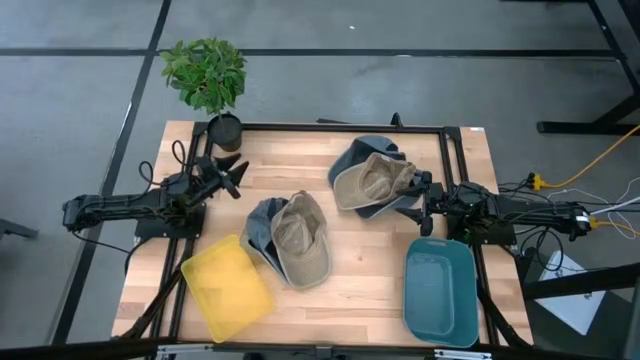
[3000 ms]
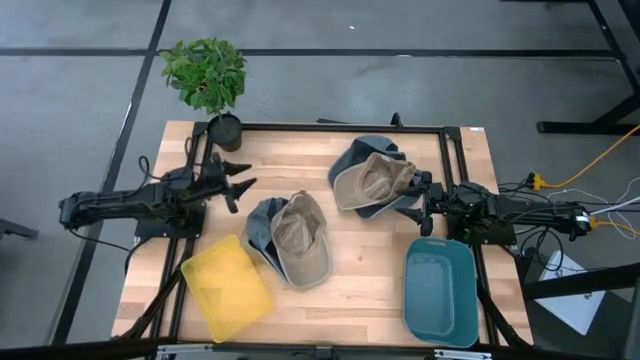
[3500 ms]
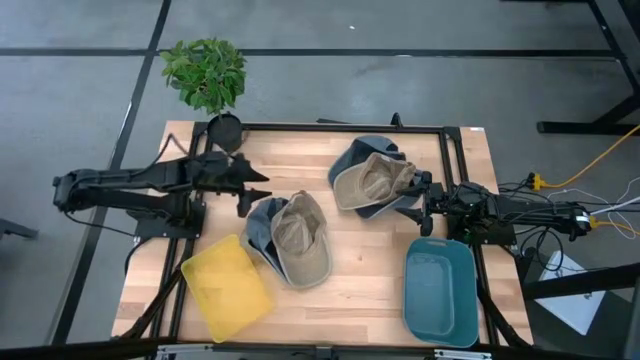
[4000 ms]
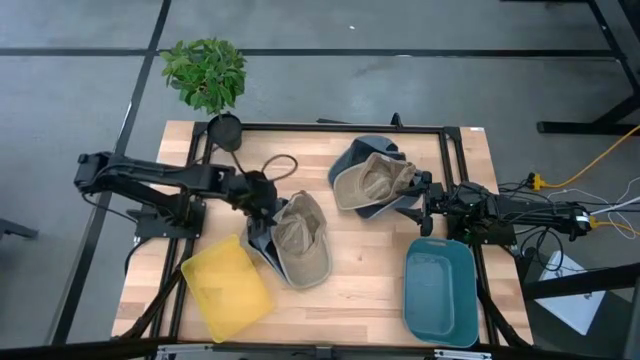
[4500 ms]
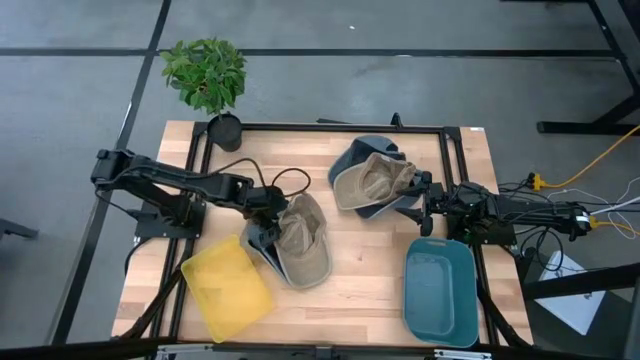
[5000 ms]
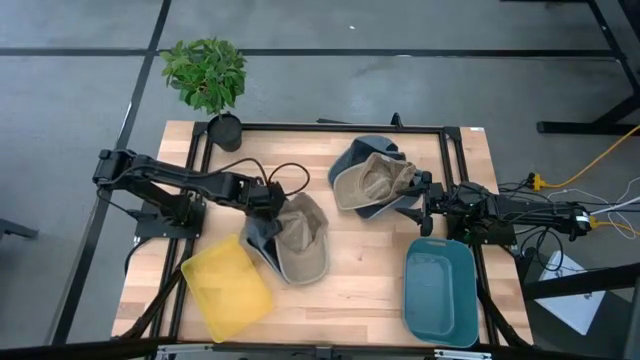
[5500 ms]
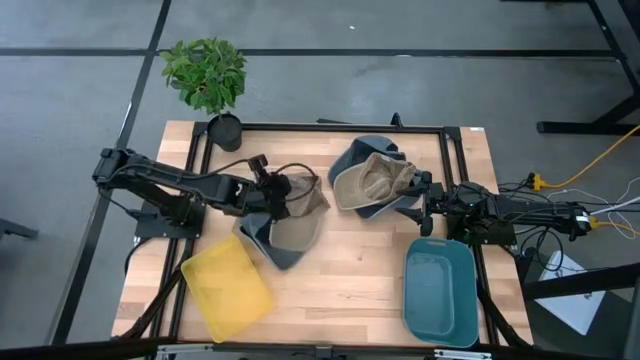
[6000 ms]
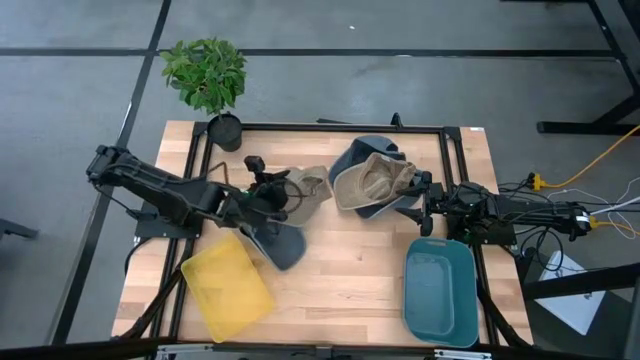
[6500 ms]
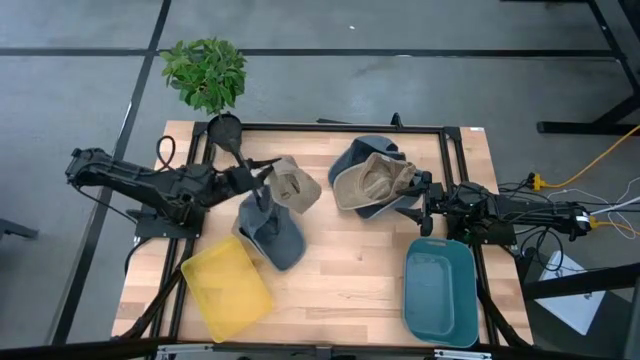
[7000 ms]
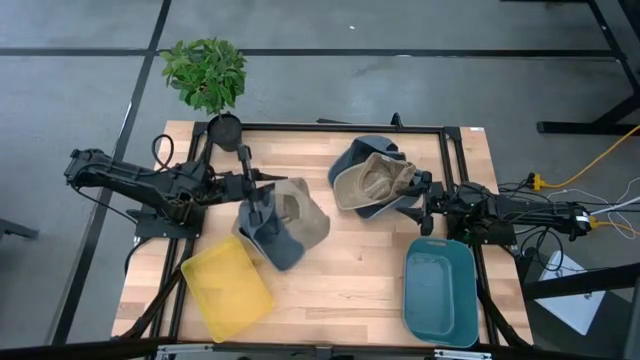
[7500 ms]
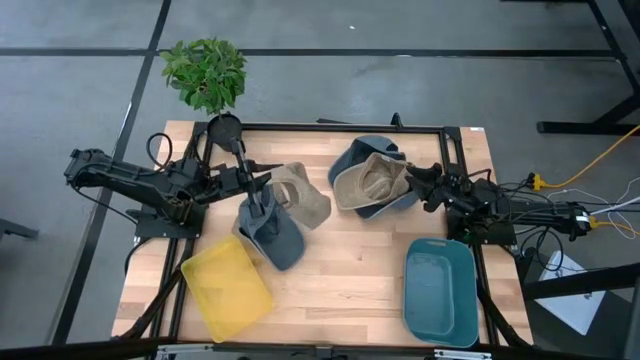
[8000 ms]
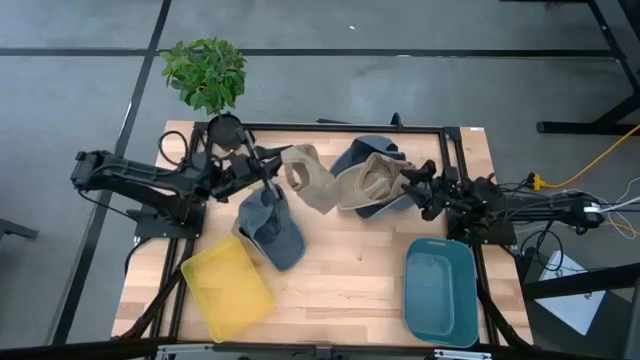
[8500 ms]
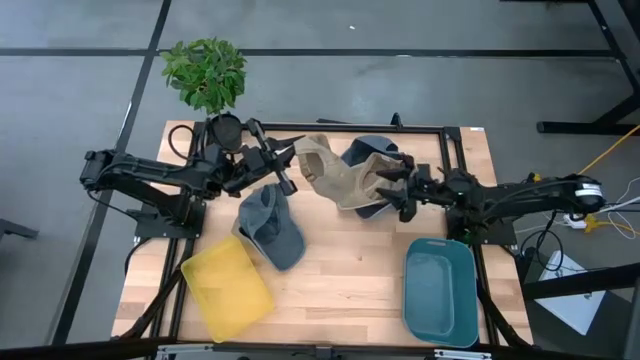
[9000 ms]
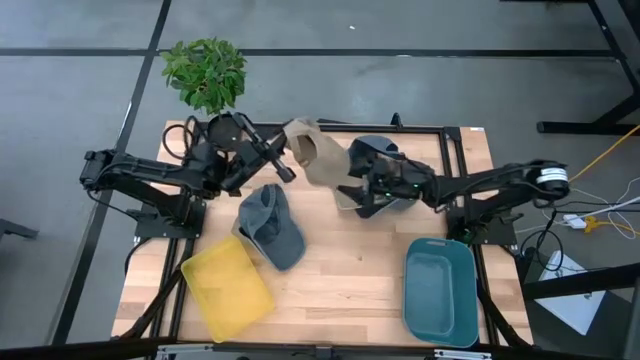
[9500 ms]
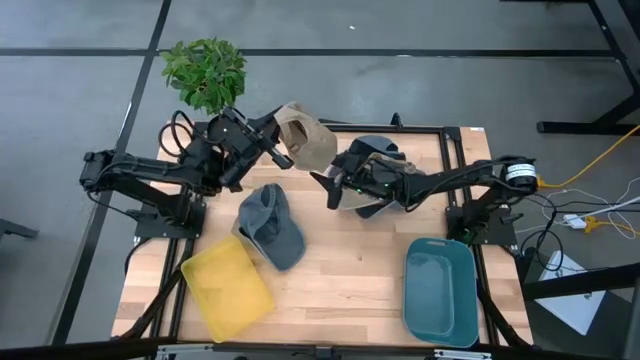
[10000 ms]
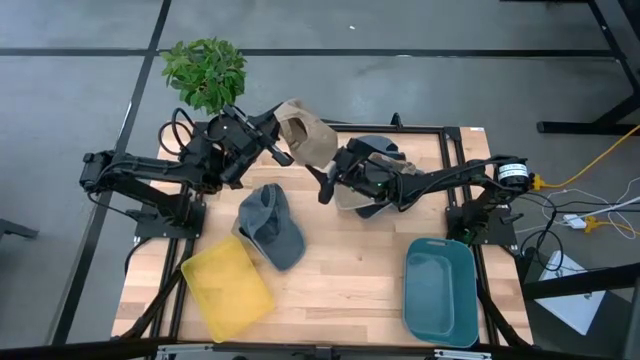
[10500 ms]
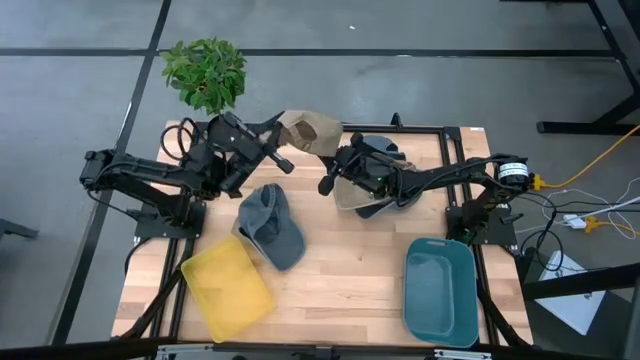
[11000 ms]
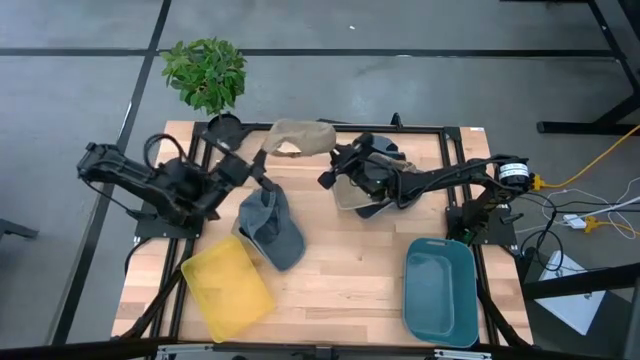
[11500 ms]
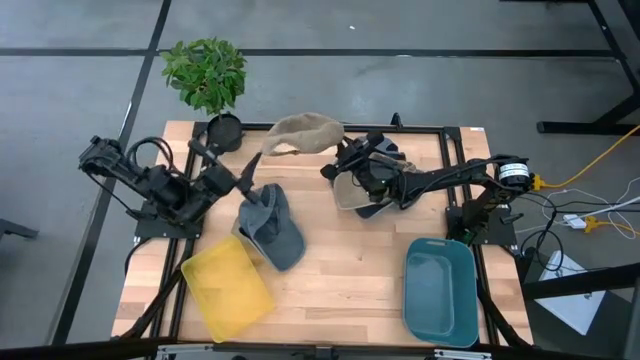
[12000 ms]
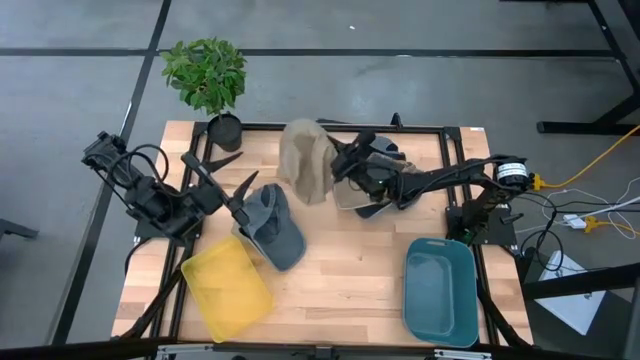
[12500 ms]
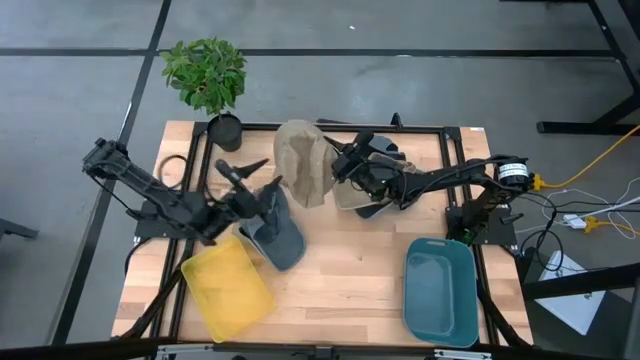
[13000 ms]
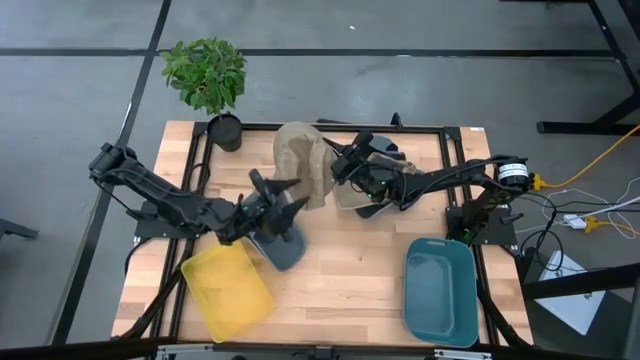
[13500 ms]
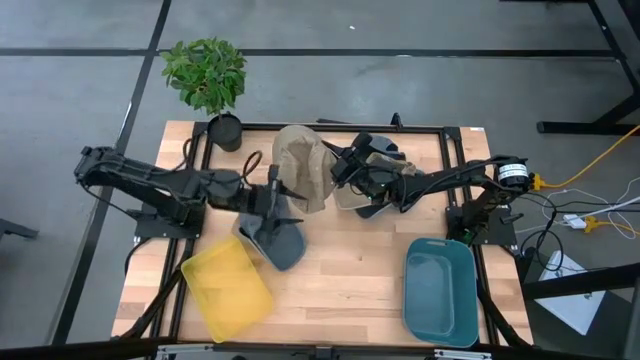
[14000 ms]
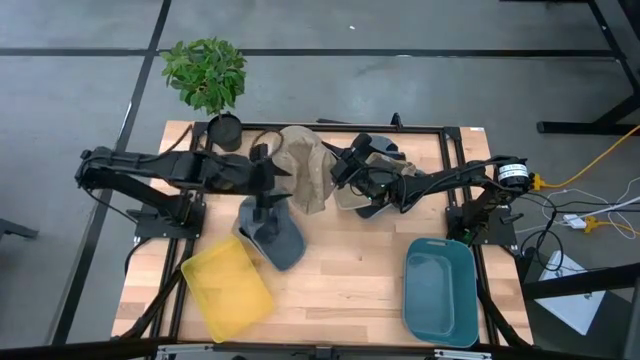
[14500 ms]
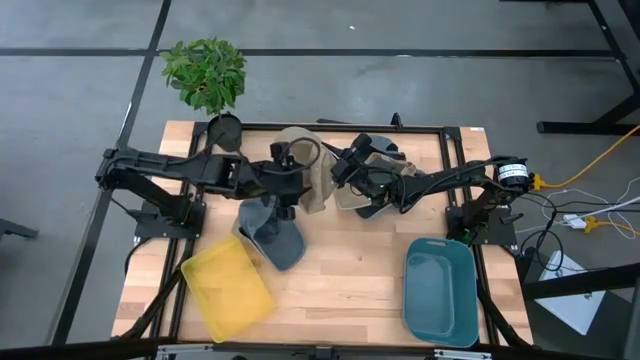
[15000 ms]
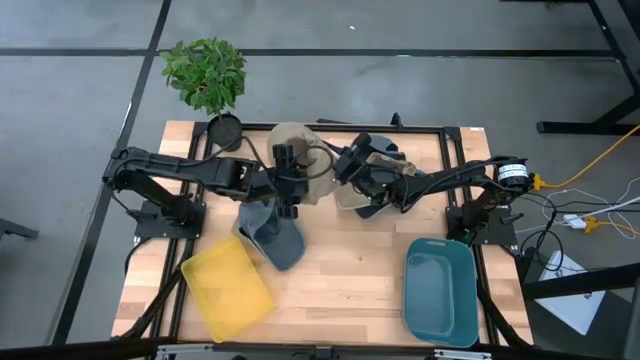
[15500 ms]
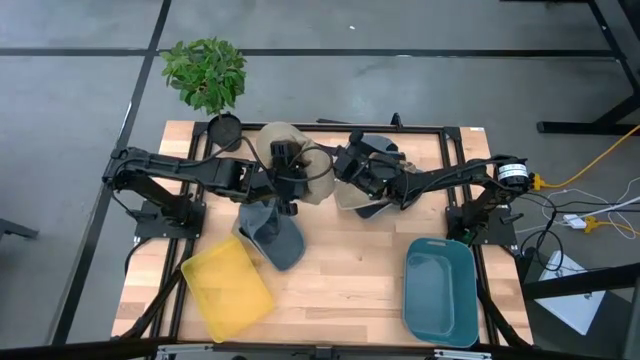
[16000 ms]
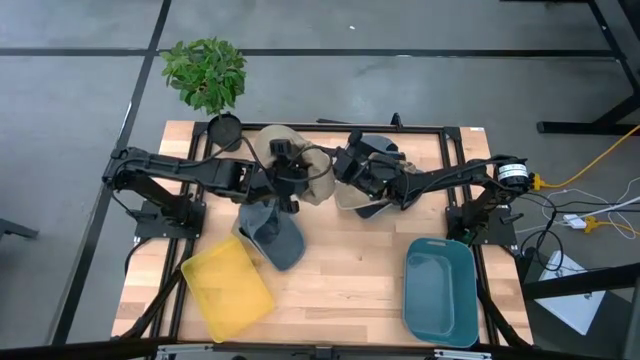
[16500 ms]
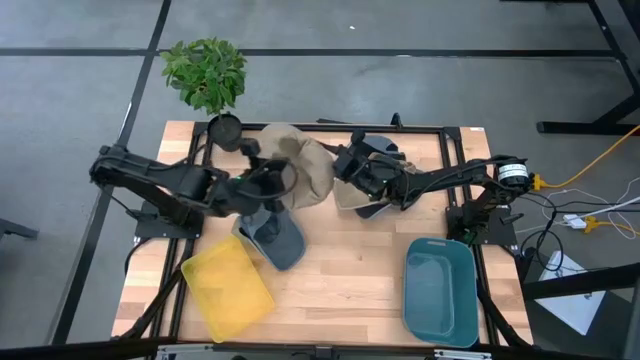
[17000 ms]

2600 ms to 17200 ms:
Task: Pick & Place hat
Put the middle brown cap into the blue bin
